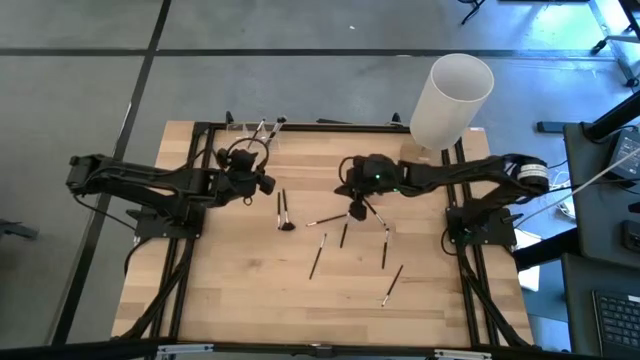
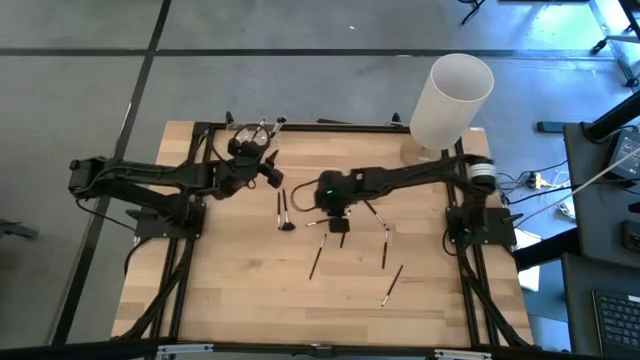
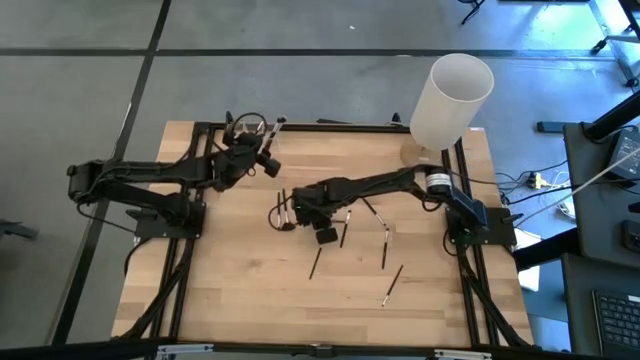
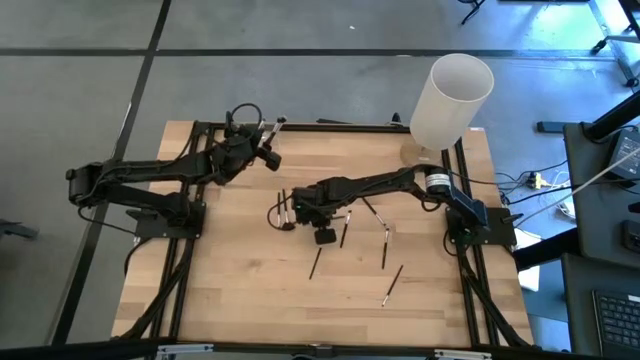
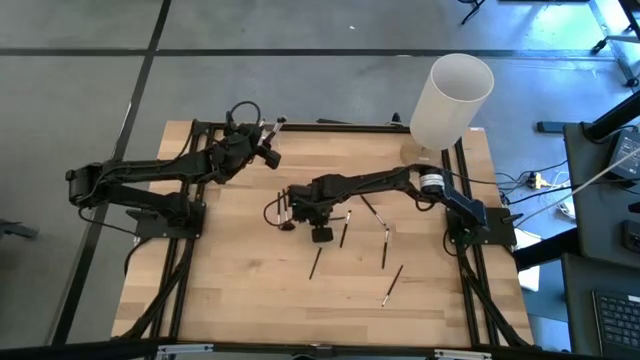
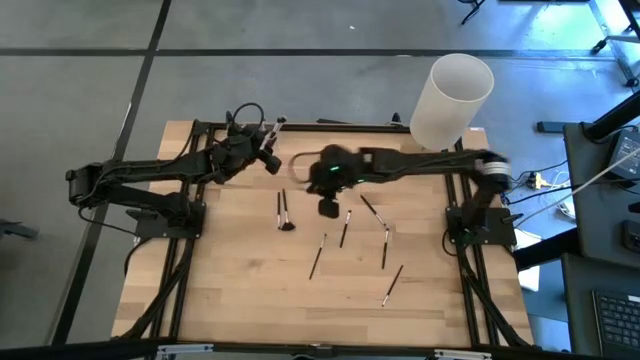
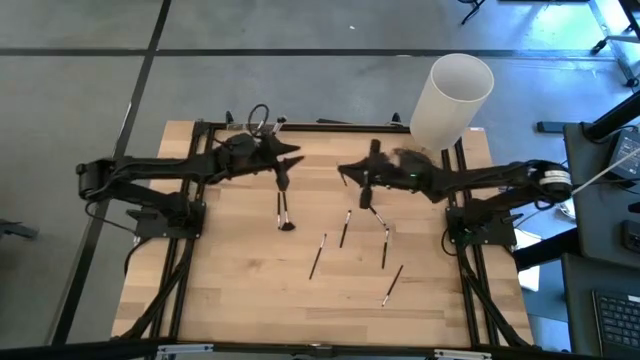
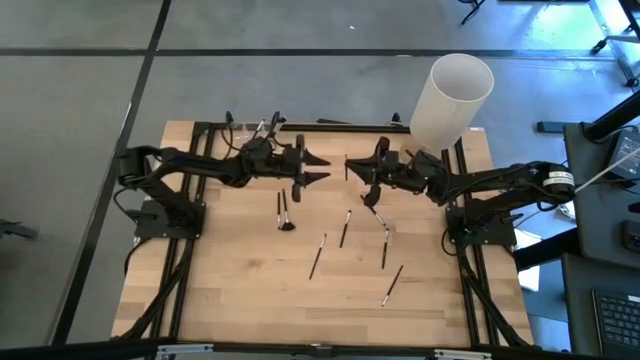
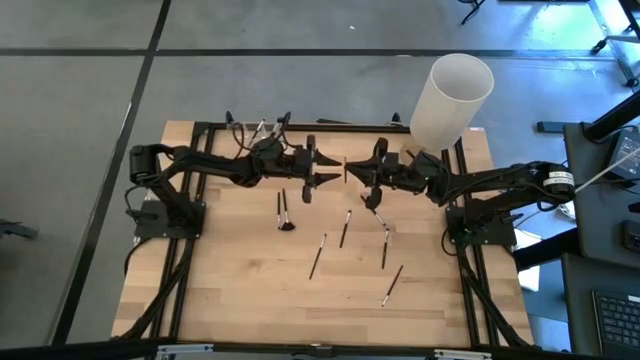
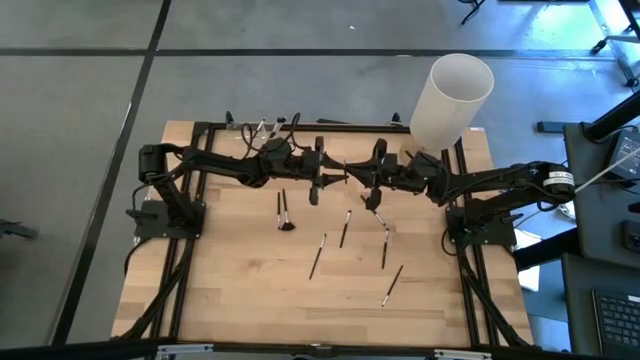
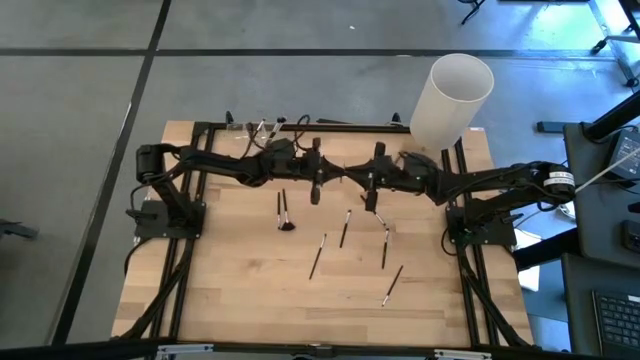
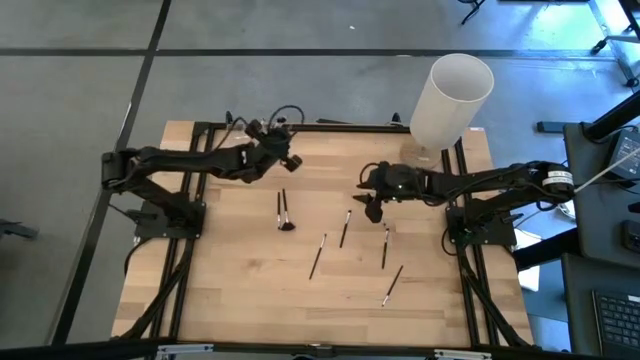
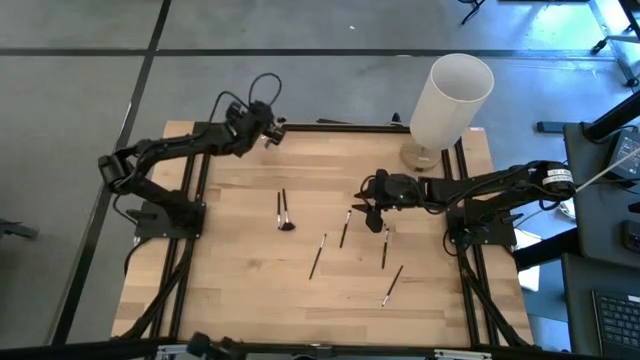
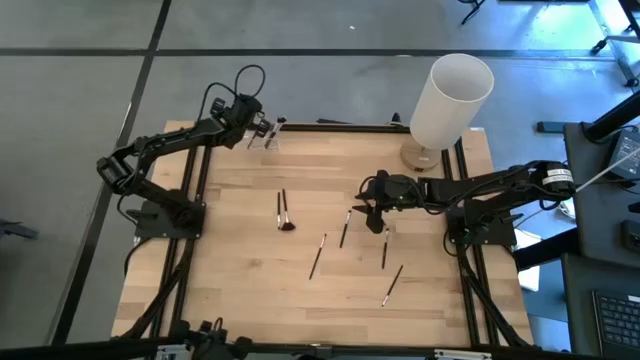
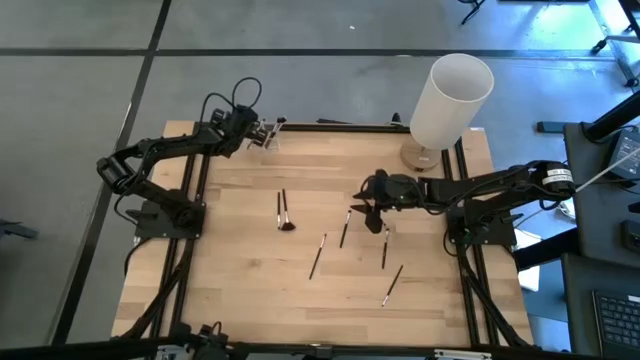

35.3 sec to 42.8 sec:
Task: Put items in baskets/containers
Put the black eyeshadow brush into the transparent organizer

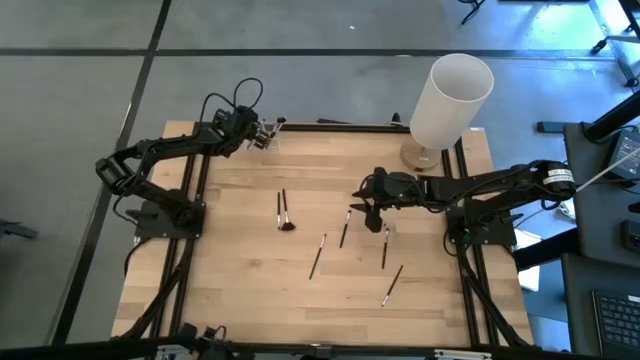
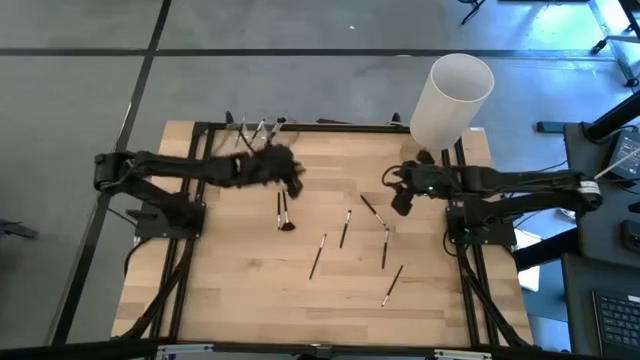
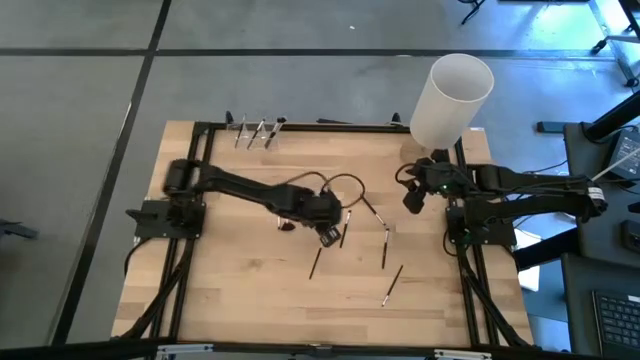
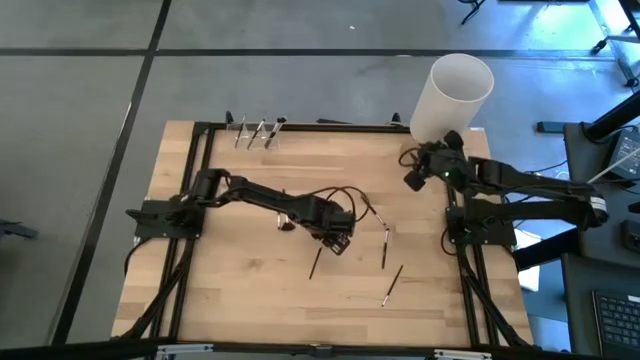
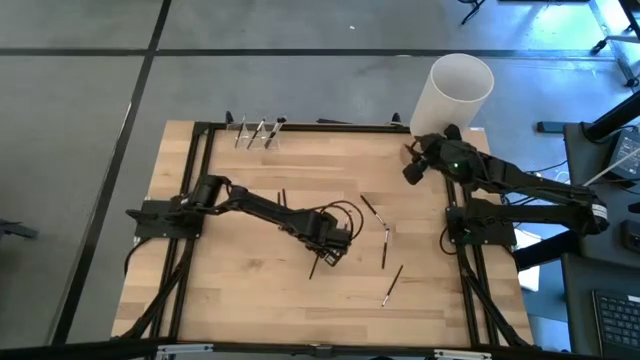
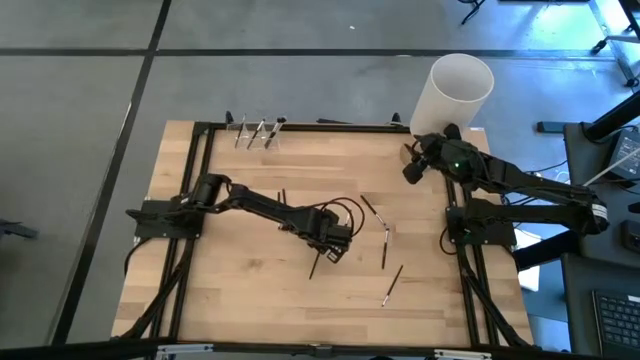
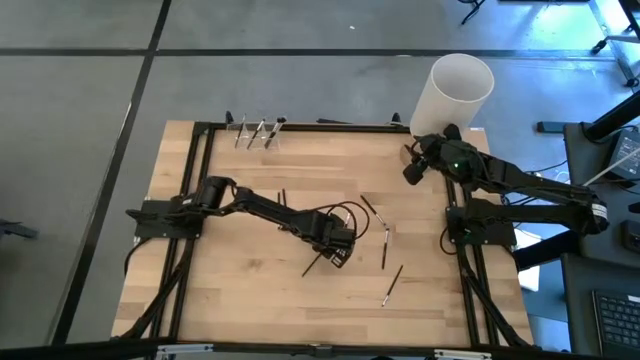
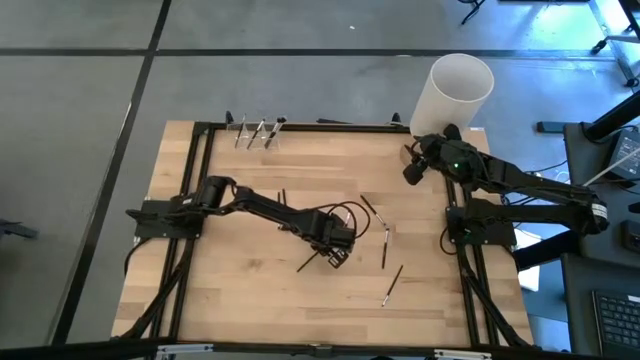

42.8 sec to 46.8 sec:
Put the black eyeshadow brush into the transparent organizer

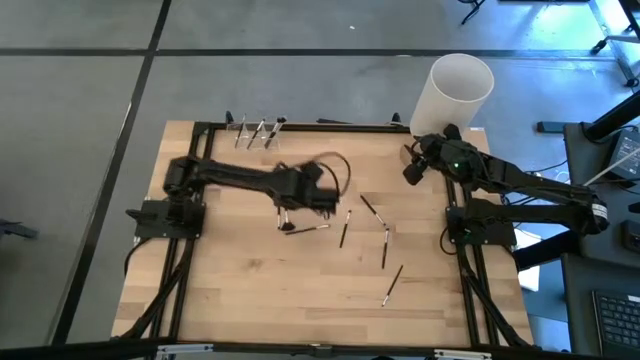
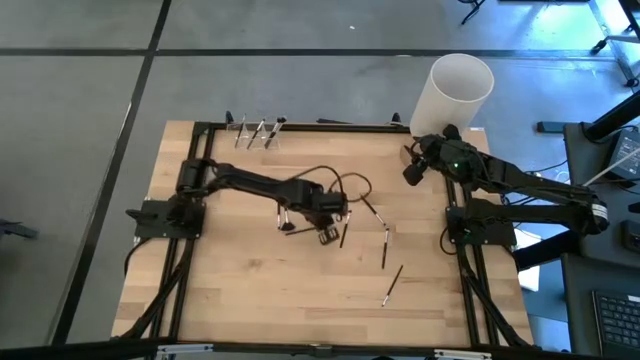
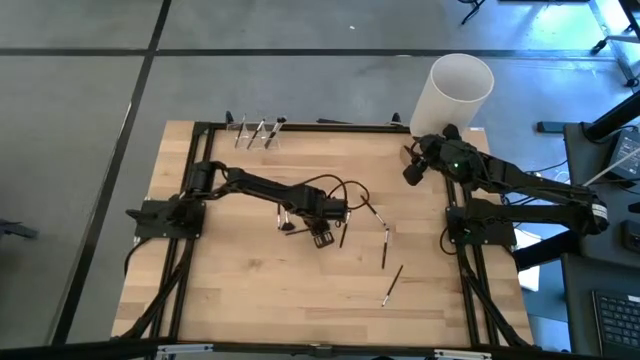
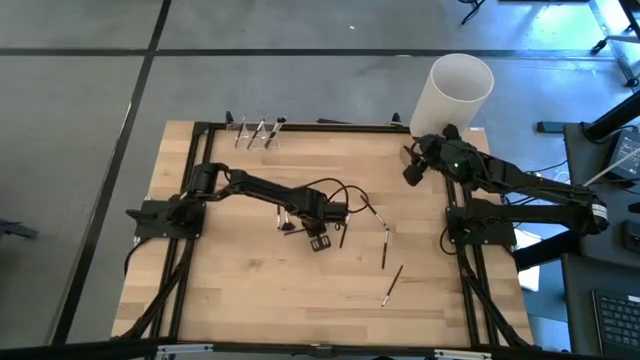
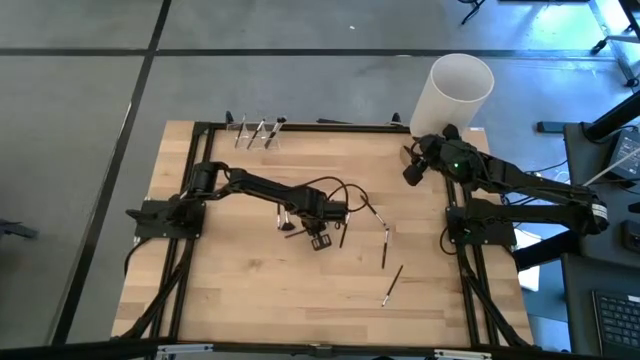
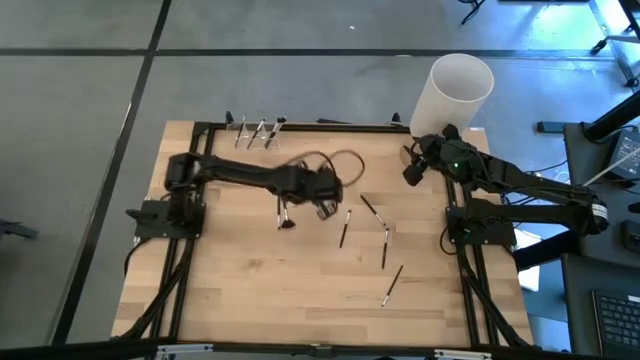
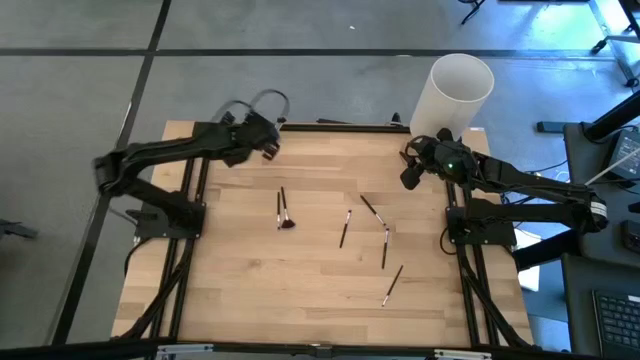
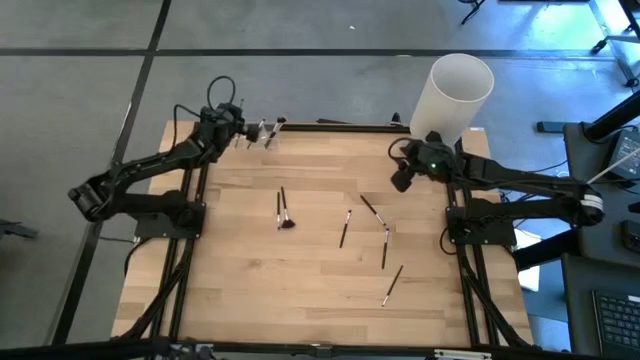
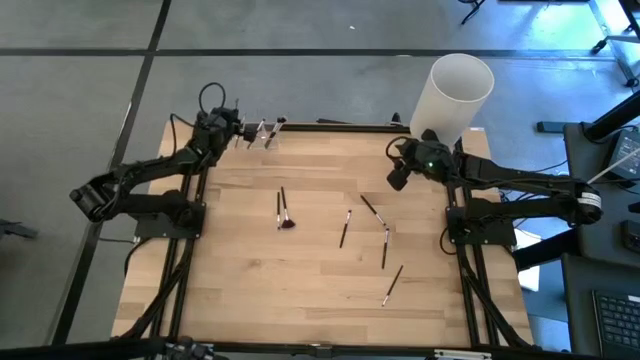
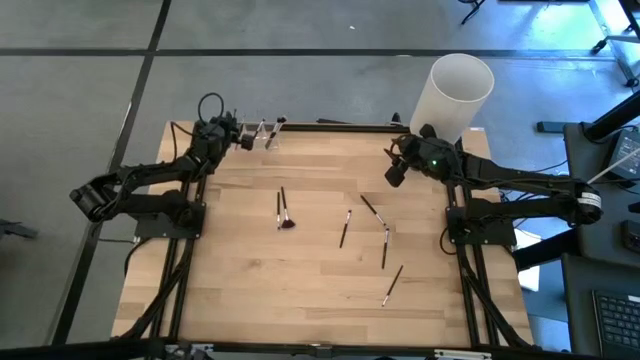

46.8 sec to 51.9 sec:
Put the black eyeshadow brush into the transparent organizer

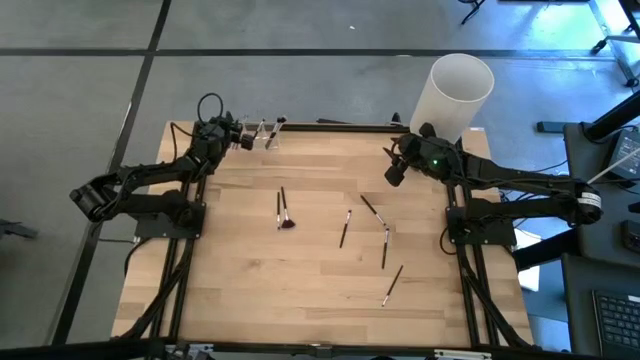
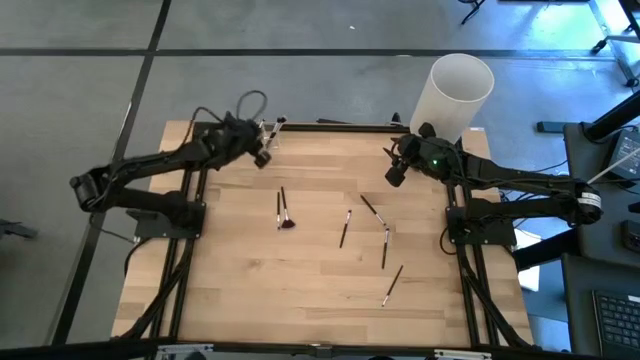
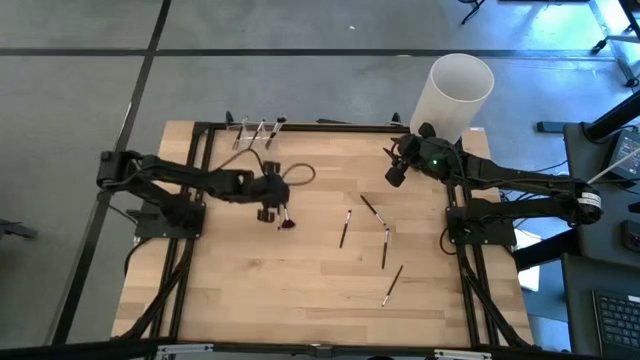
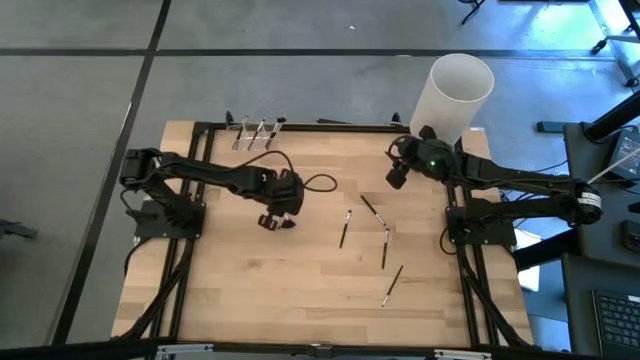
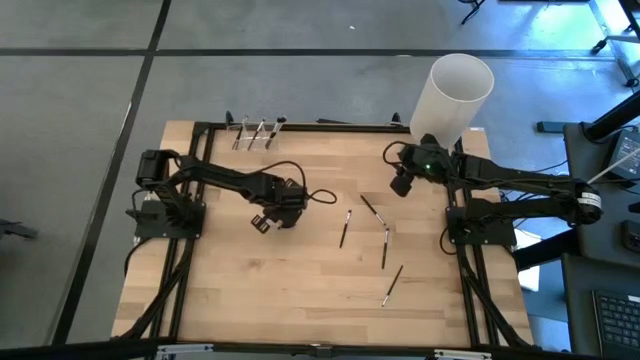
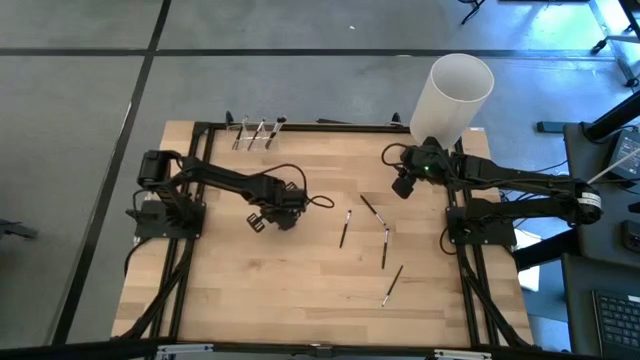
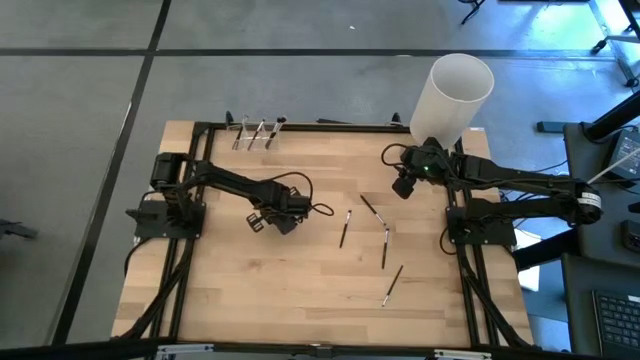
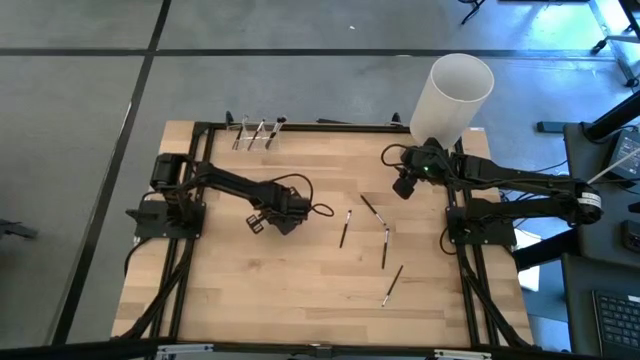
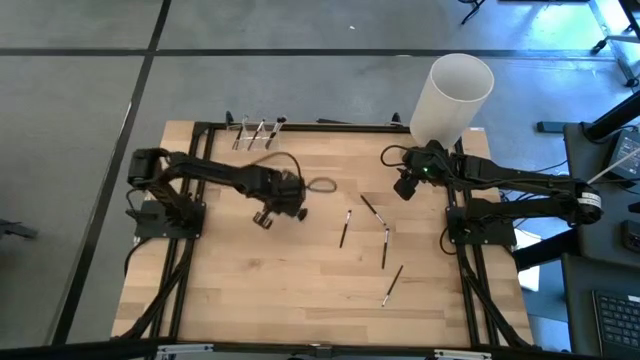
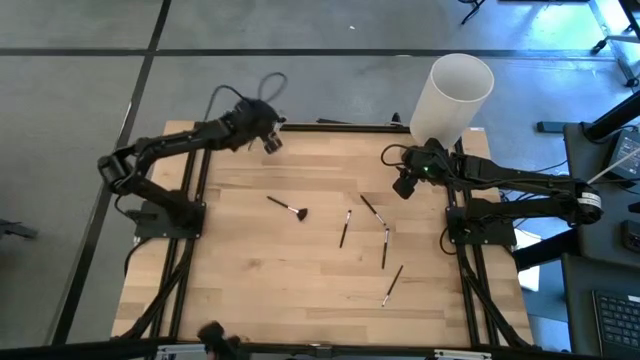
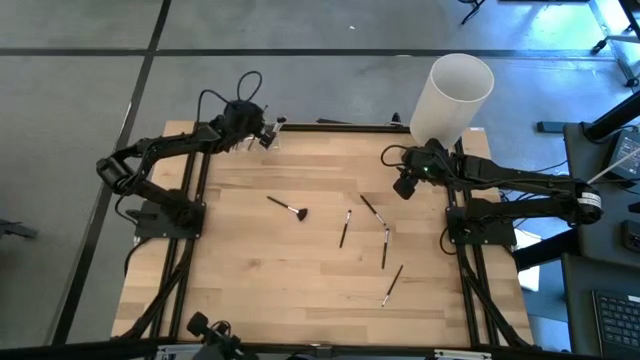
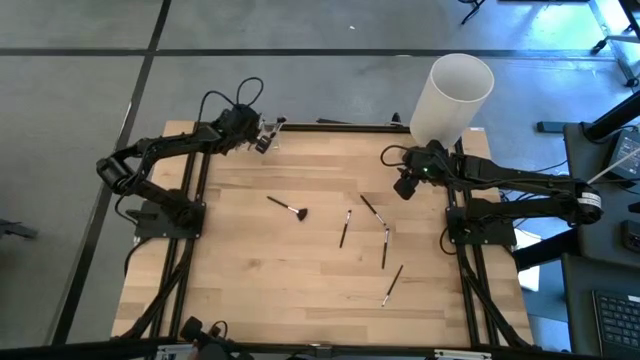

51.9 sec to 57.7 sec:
Put the black eyeshadow brush into the transparent organizer
